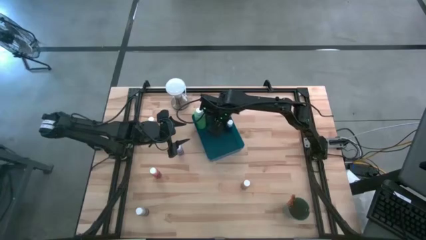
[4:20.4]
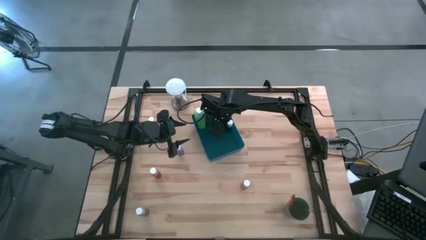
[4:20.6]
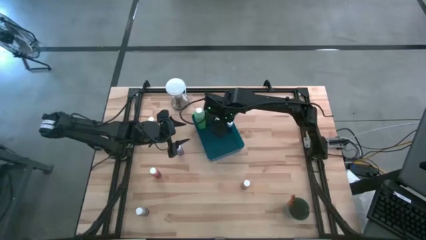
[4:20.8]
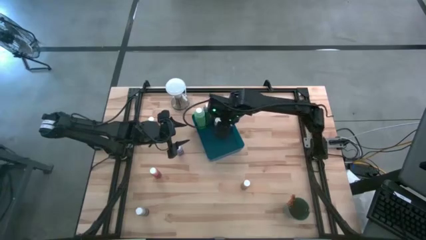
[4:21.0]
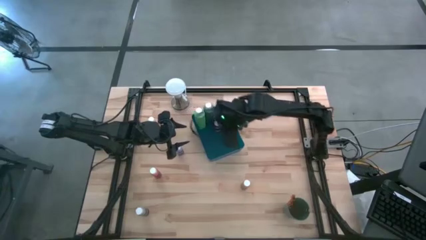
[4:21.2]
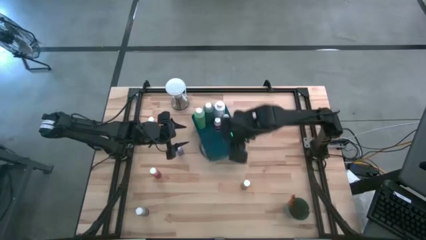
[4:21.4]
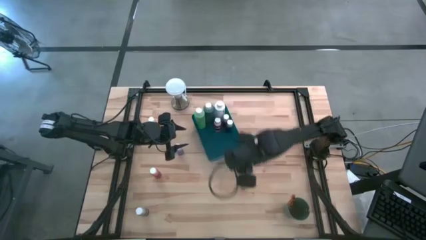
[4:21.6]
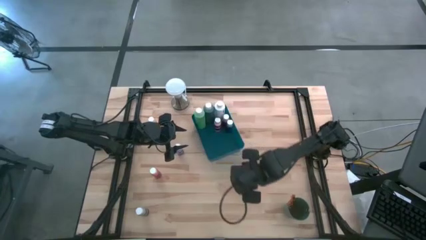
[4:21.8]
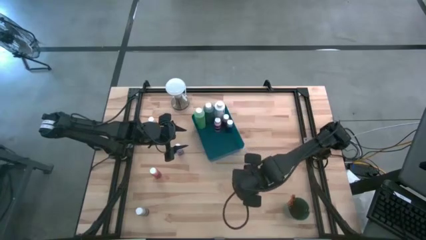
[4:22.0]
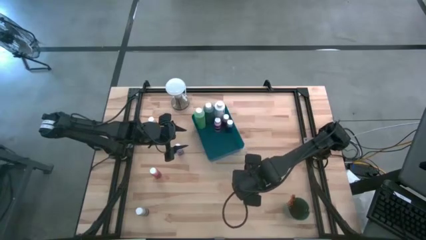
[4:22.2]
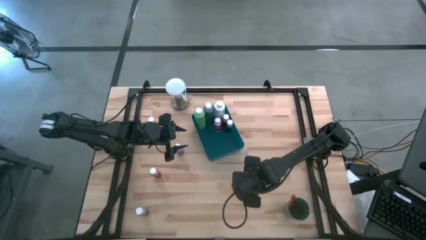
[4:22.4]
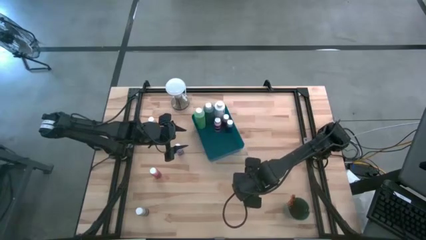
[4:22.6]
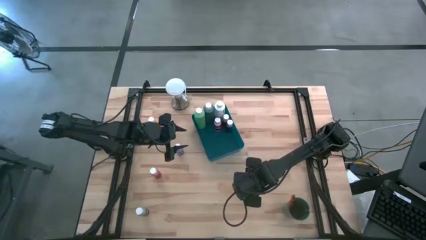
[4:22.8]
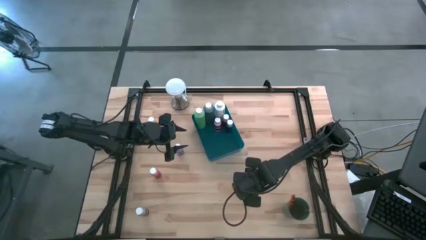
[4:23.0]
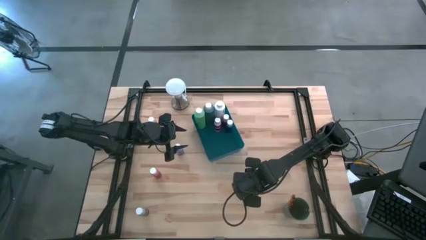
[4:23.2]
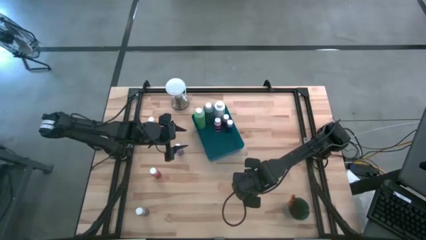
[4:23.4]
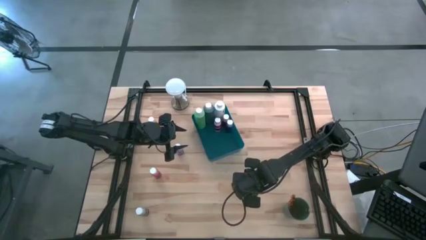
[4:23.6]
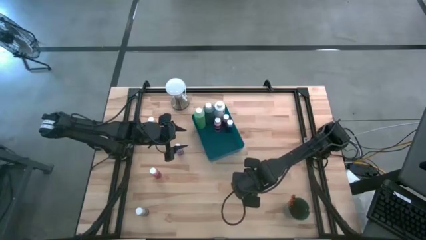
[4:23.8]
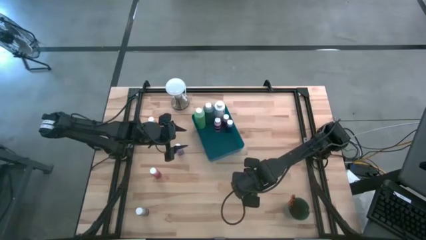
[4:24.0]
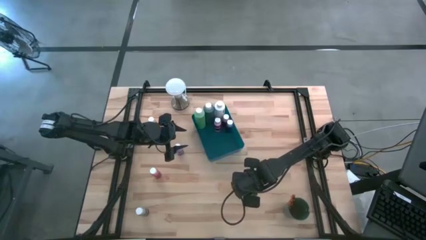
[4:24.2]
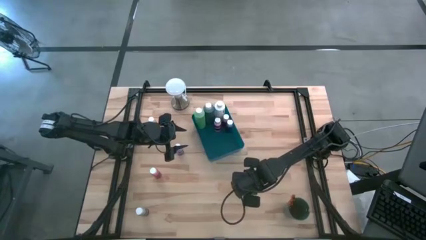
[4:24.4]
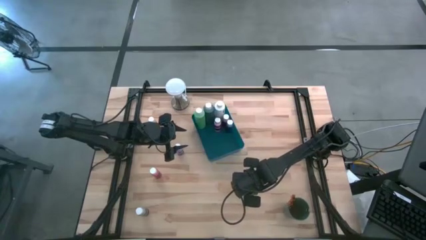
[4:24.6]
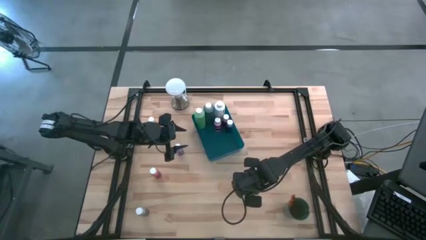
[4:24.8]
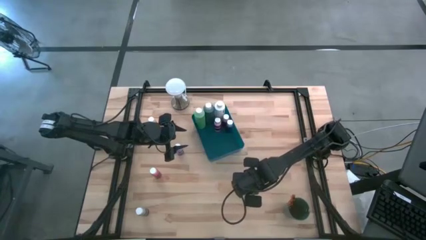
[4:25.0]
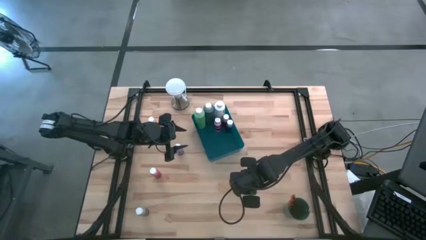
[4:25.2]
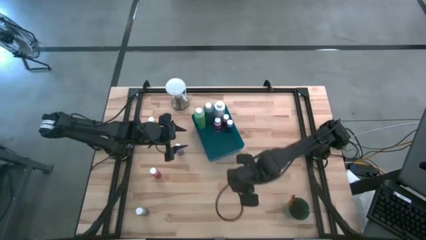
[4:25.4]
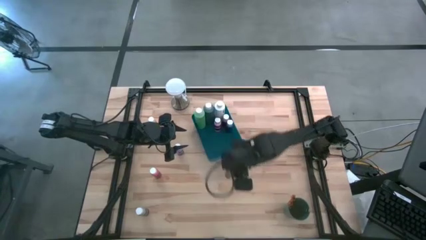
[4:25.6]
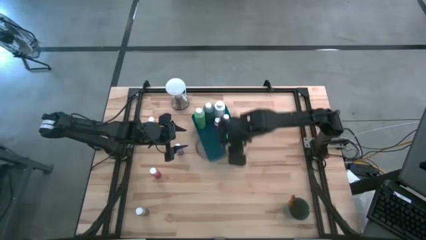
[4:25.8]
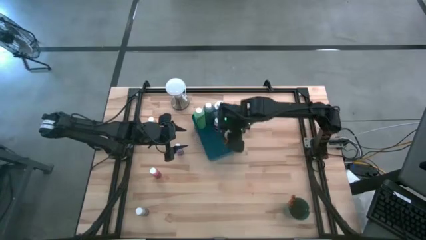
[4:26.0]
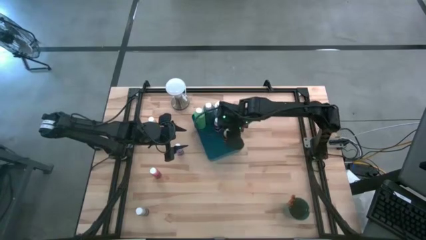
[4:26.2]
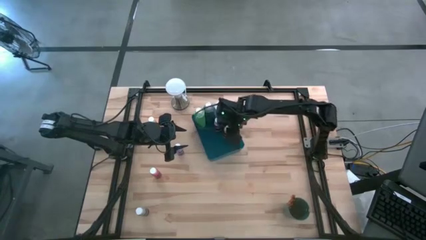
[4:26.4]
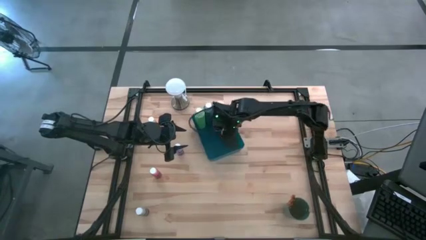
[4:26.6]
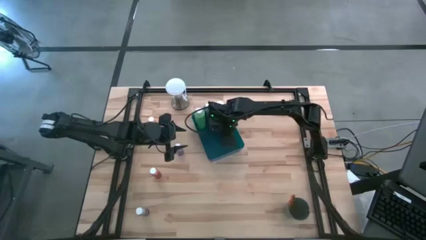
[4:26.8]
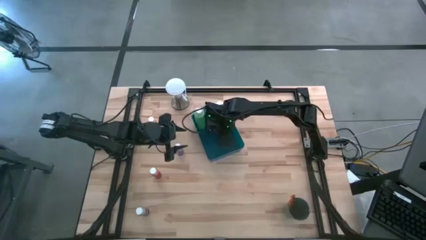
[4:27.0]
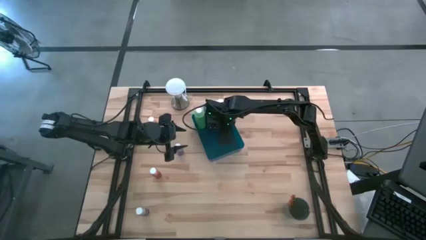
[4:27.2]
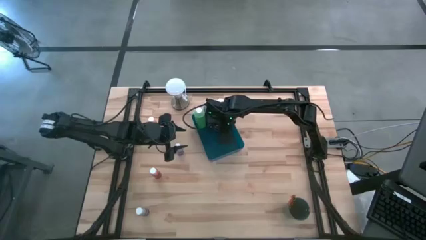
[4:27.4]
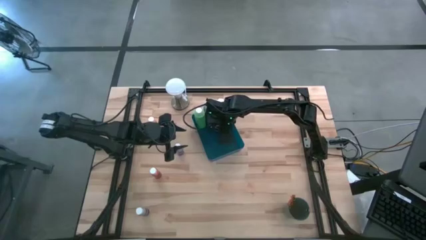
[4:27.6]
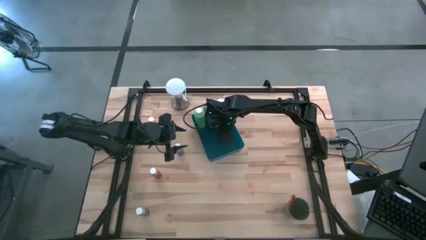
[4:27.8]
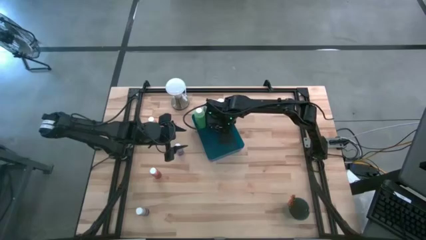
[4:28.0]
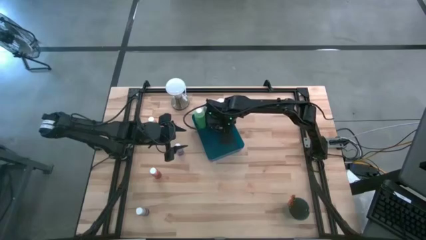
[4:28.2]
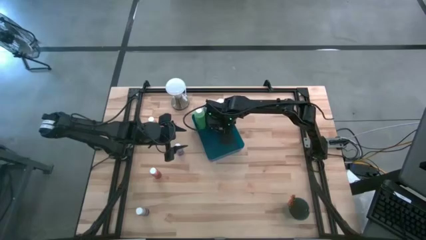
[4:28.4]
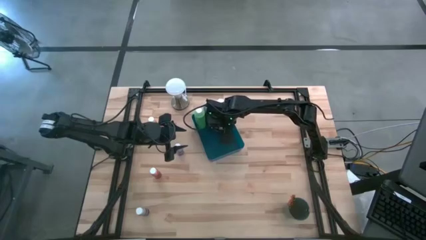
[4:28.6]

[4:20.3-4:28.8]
Task: Pick & Place Paint Supplies
Put the yellow paint bottle into the blue bin
